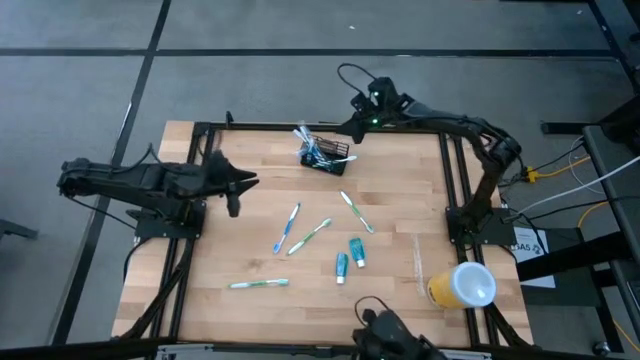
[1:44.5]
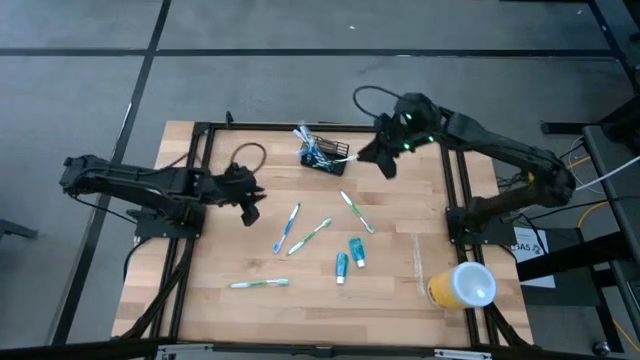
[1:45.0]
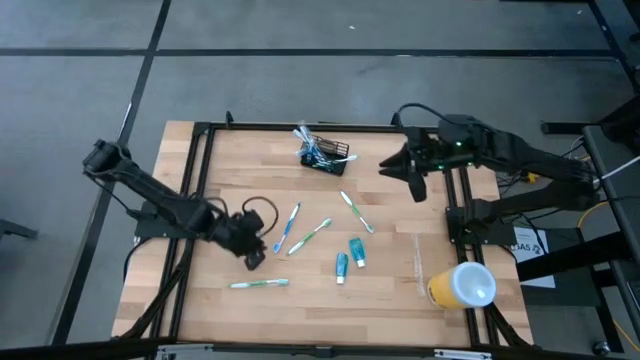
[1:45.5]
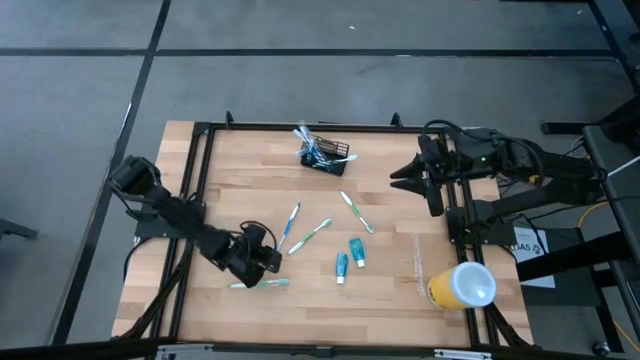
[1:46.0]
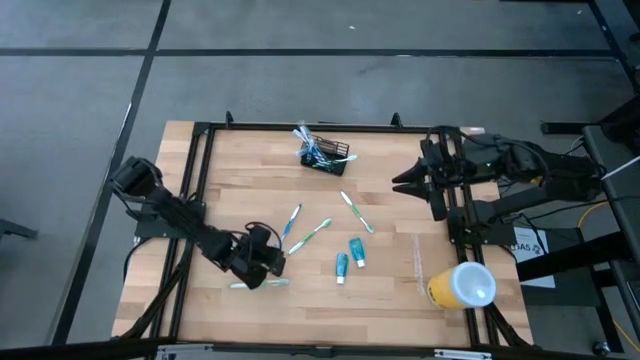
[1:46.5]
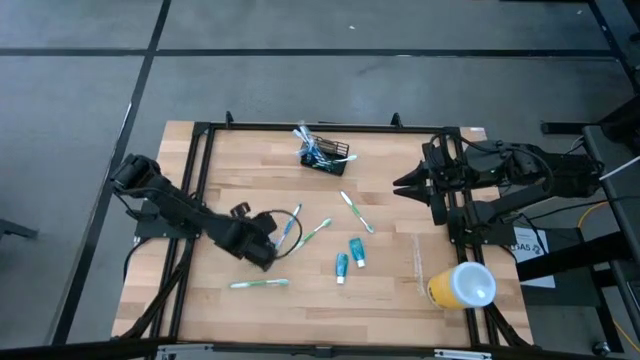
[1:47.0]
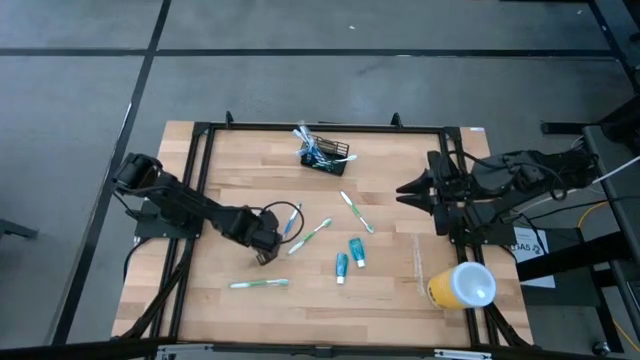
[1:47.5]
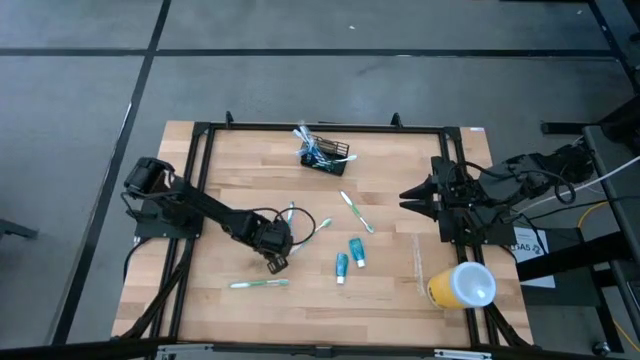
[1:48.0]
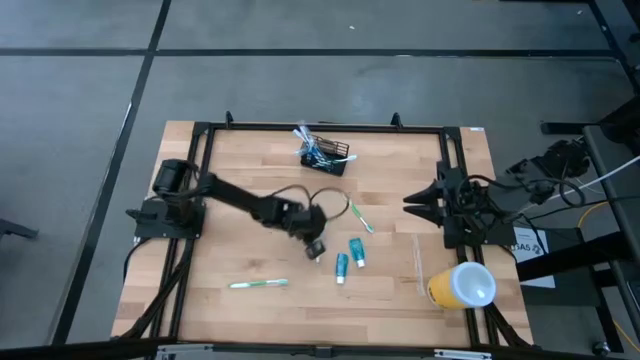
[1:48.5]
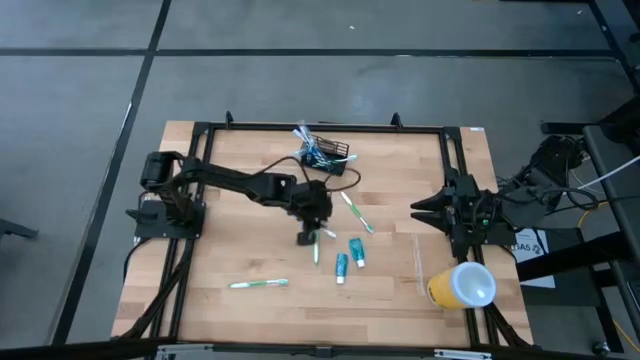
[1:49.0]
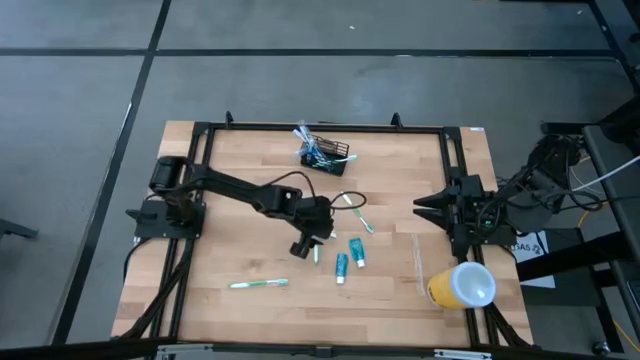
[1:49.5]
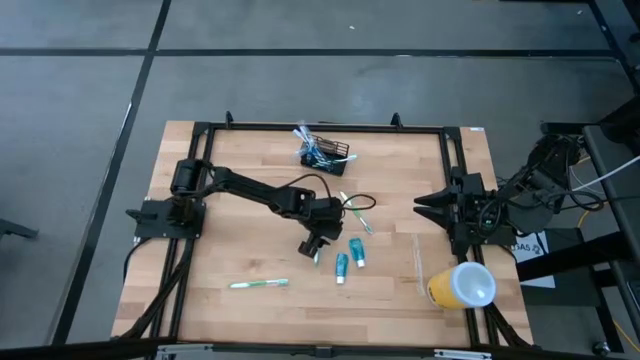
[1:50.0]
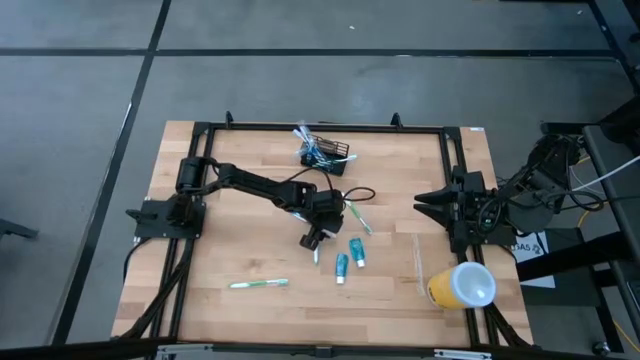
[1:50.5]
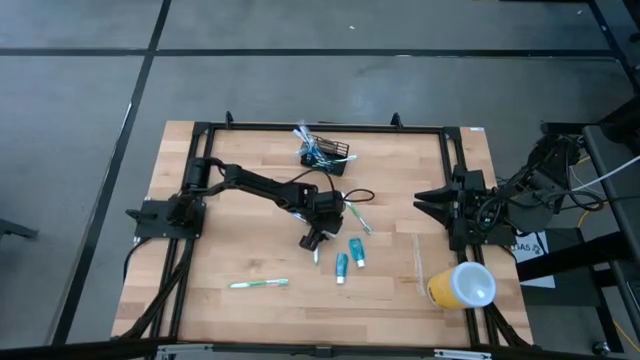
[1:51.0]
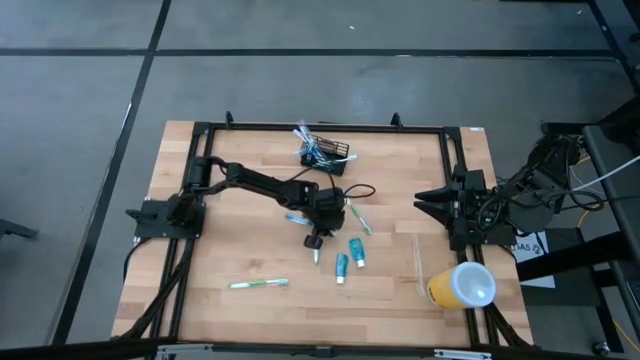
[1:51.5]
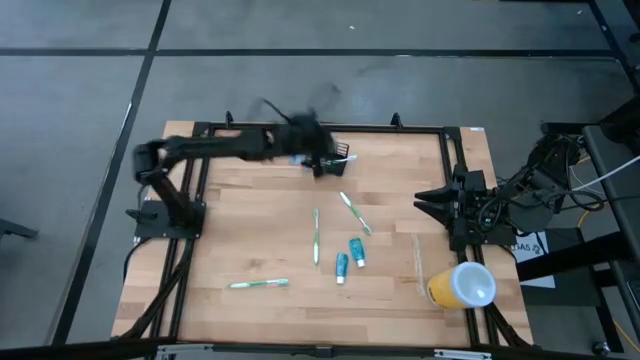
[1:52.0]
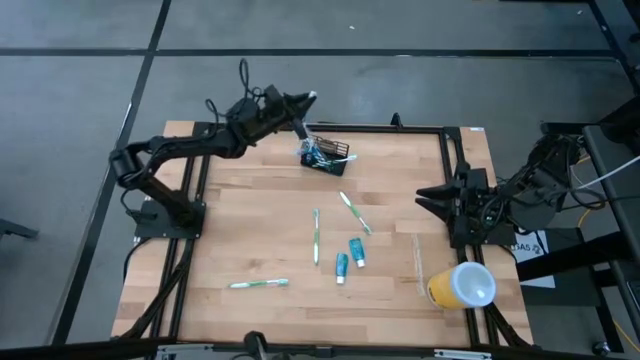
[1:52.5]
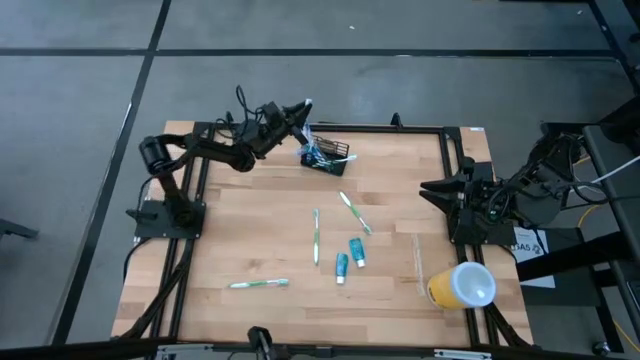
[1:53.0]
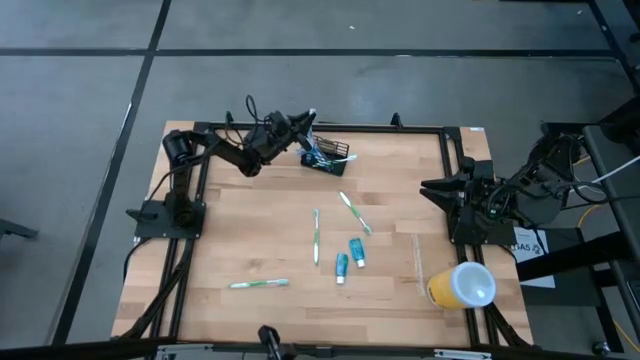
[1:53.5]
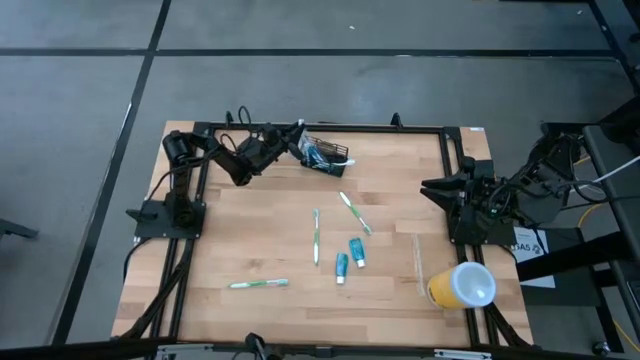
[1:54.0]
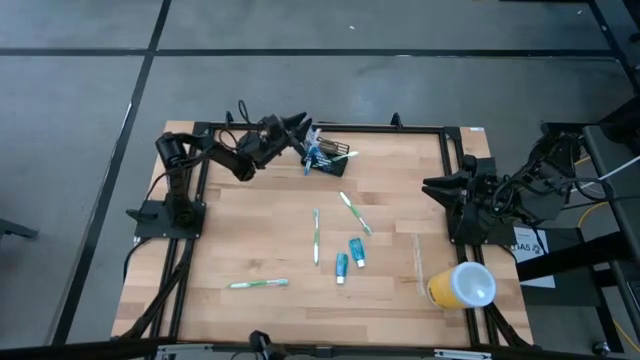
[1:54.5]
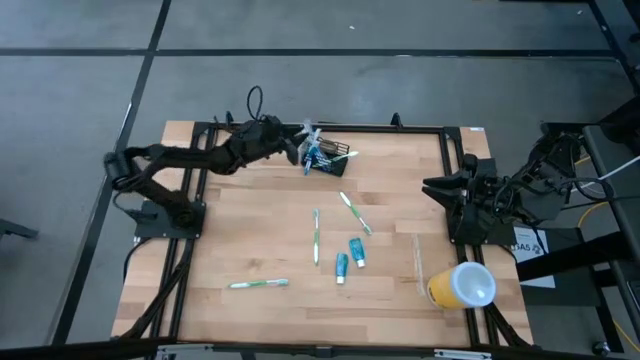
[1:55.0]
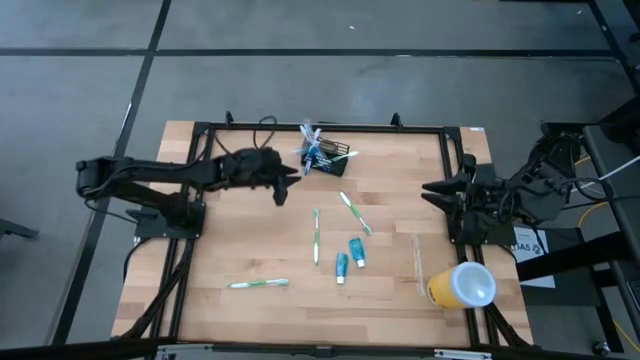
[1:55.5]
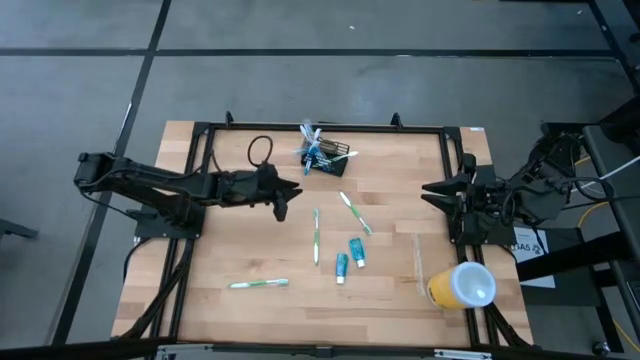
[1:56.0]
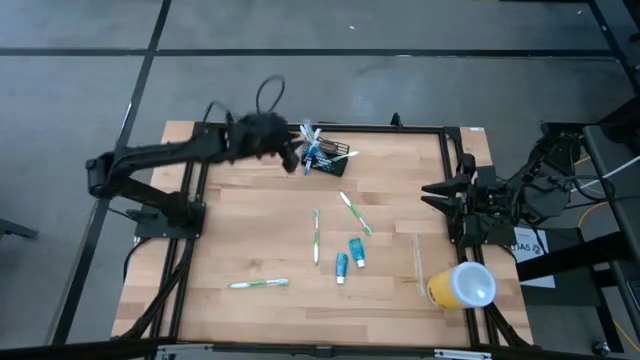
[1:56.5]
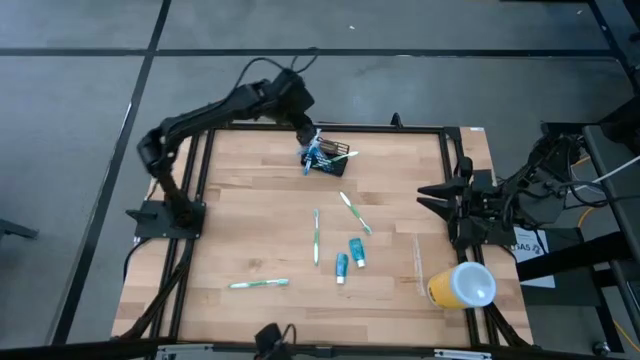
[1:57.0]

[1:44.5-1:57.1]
Task: Pick & Place toothbrushing station
Put the blue toothbrush into the wire organizer

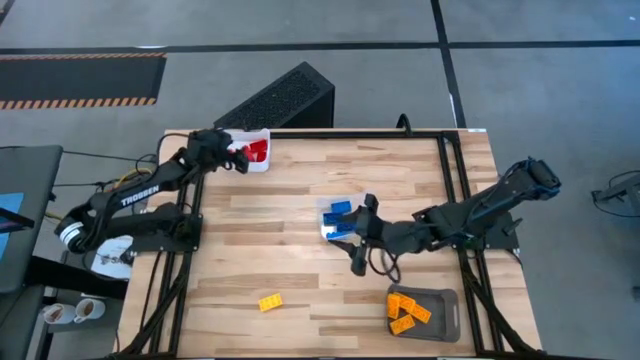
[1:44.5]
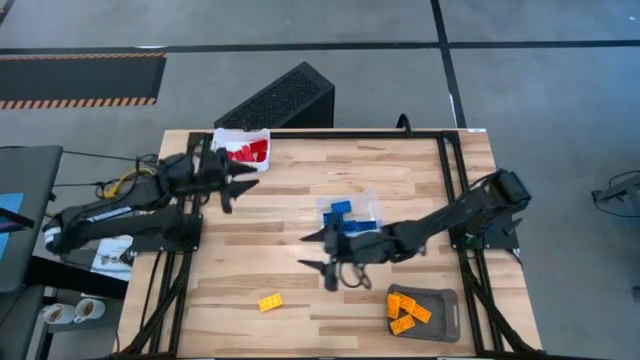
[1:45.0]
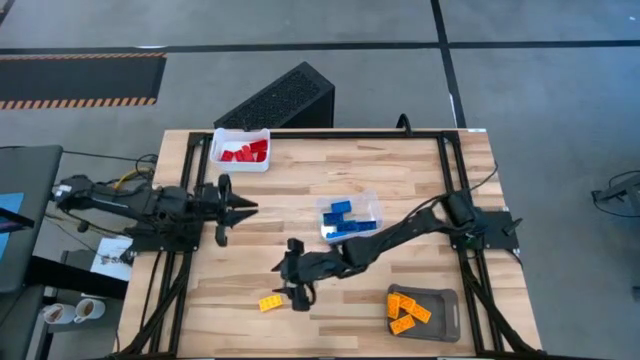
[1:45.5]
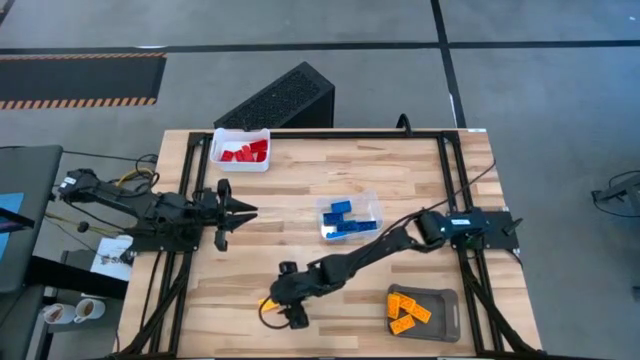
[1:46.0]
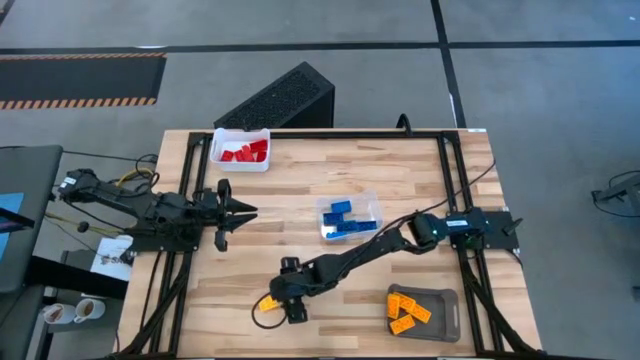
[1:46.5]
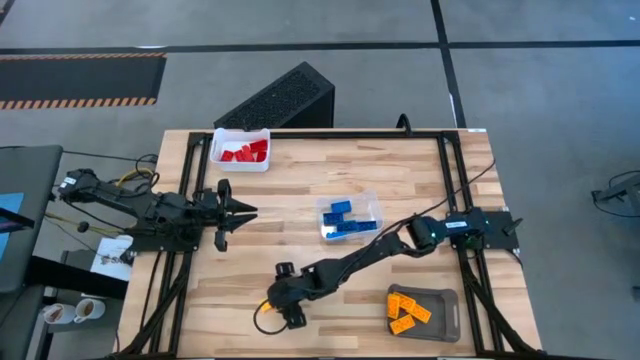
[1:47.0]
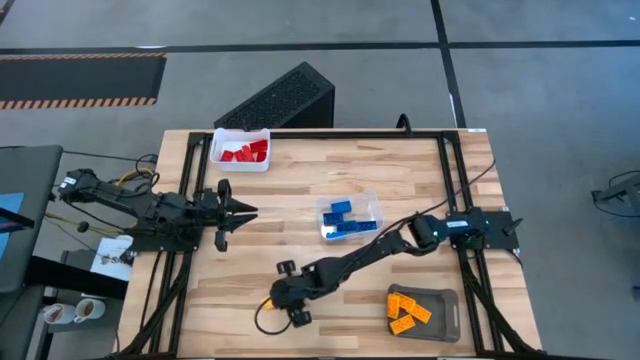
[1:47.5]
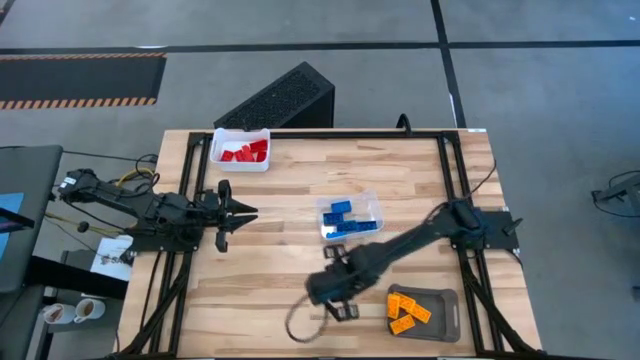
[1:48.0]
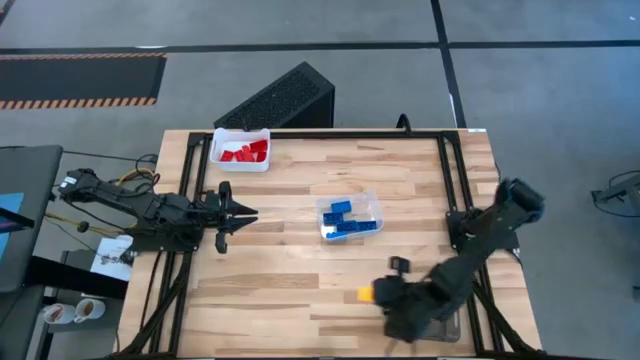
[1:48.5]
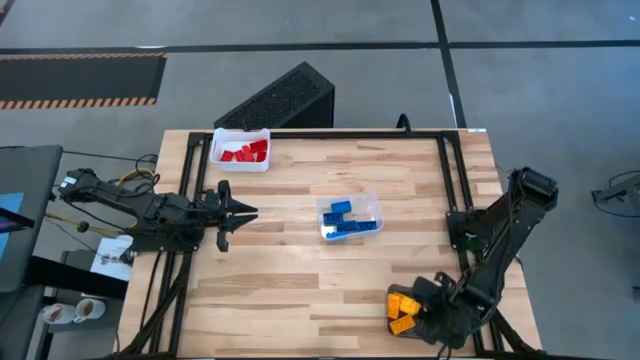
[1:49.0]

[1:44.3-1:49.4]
Task: Sort & place blocks by color
Put the yellow game piece into the black bin
